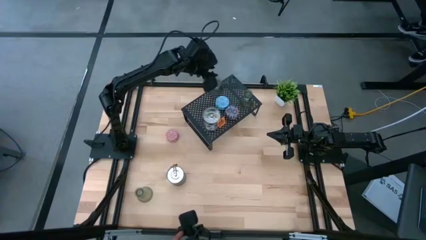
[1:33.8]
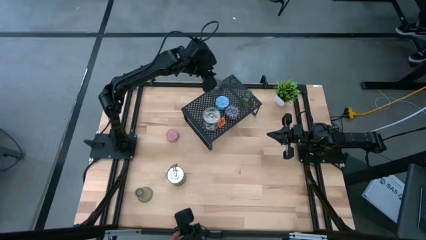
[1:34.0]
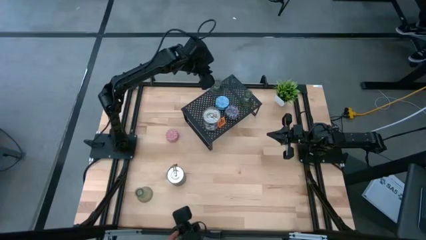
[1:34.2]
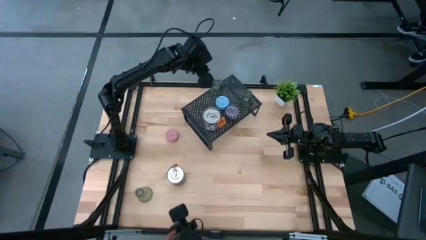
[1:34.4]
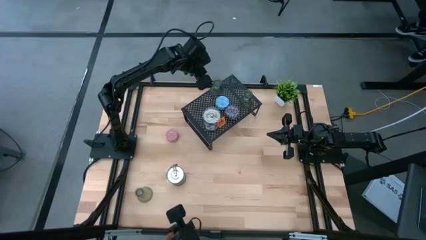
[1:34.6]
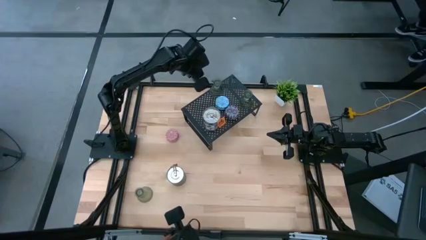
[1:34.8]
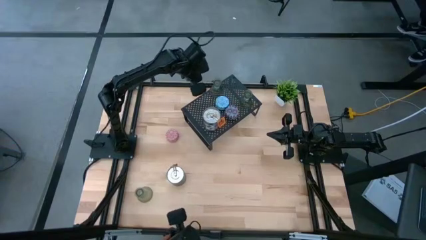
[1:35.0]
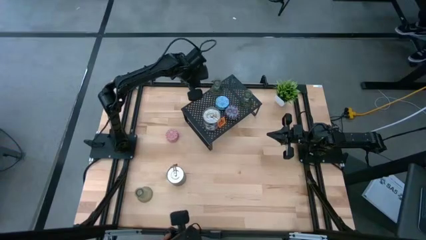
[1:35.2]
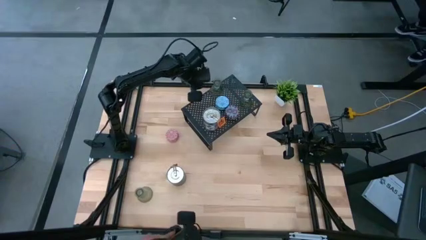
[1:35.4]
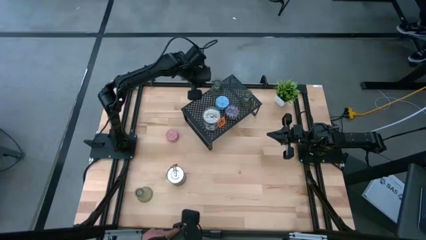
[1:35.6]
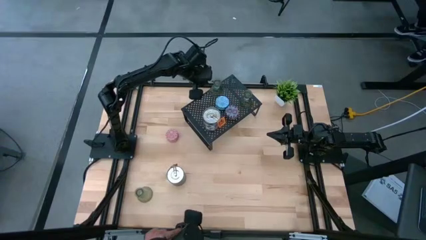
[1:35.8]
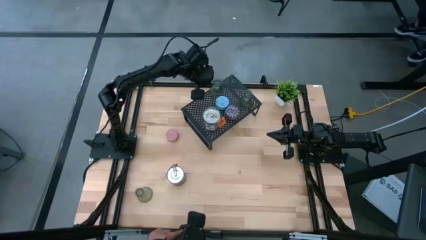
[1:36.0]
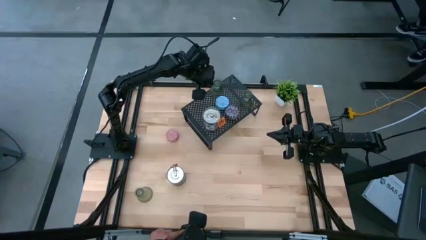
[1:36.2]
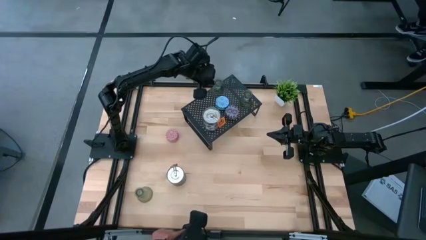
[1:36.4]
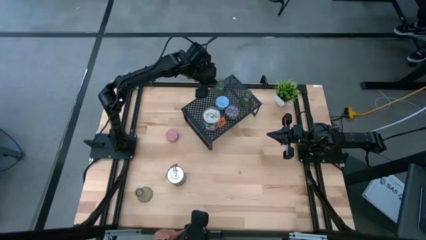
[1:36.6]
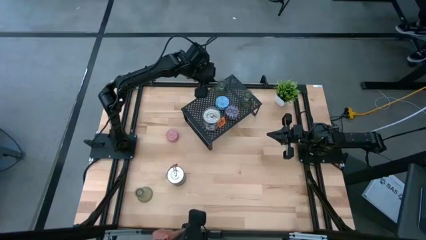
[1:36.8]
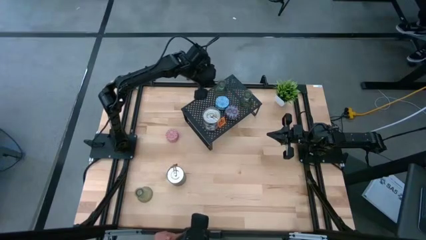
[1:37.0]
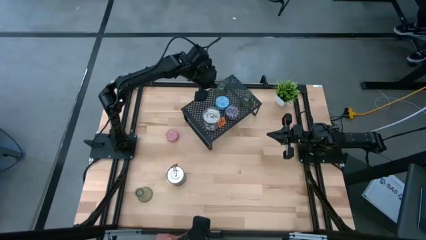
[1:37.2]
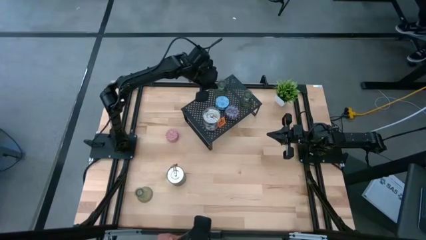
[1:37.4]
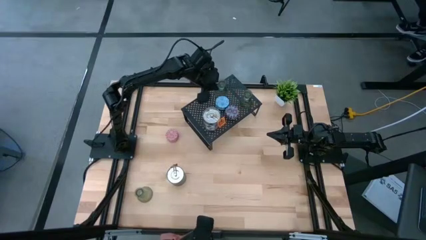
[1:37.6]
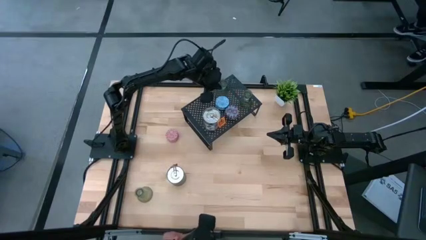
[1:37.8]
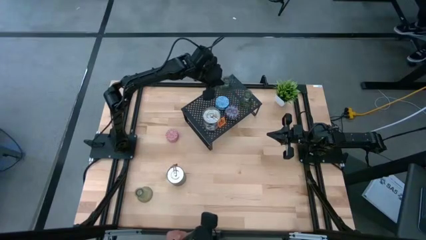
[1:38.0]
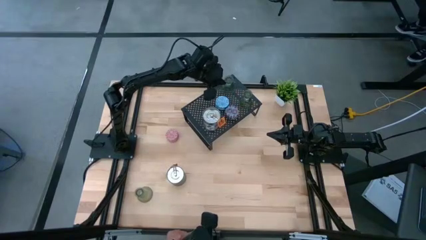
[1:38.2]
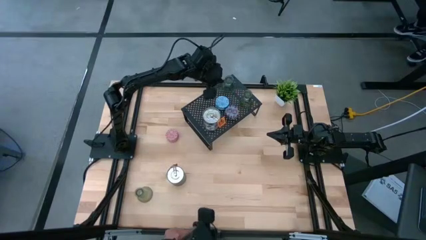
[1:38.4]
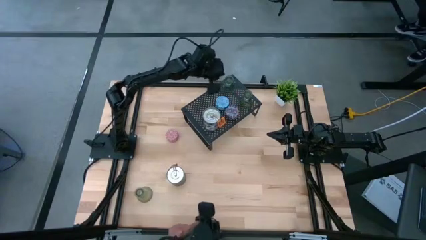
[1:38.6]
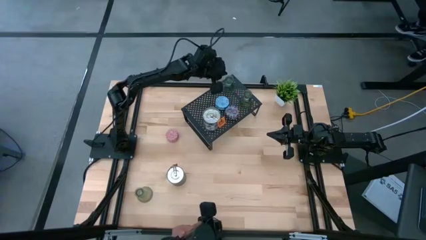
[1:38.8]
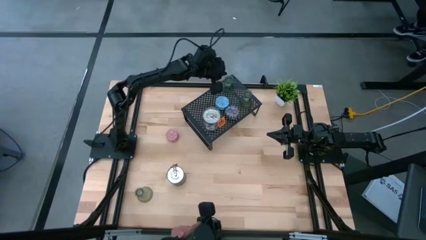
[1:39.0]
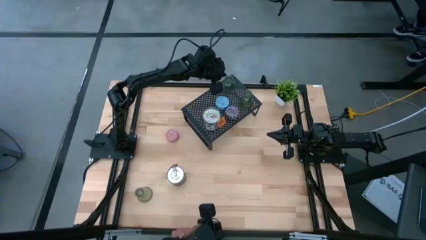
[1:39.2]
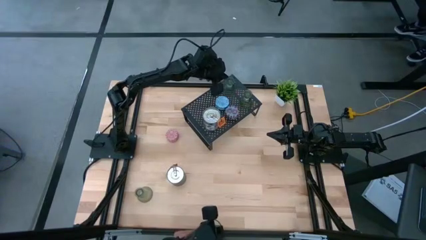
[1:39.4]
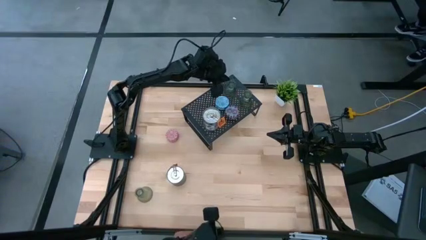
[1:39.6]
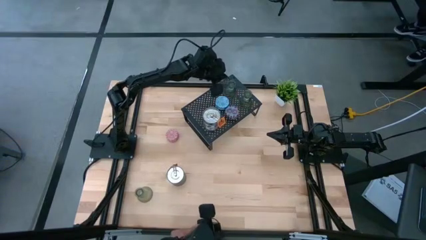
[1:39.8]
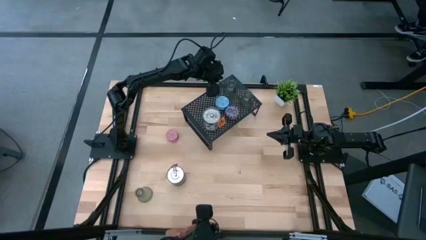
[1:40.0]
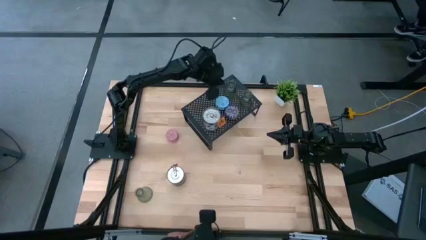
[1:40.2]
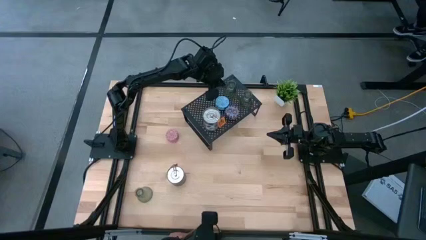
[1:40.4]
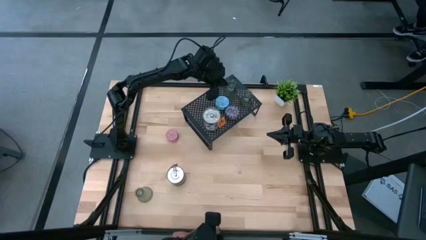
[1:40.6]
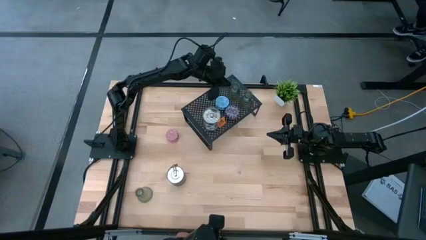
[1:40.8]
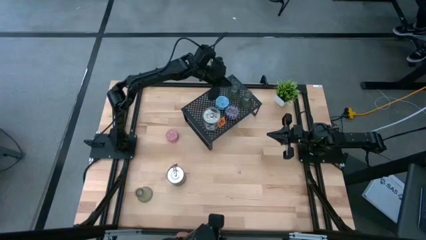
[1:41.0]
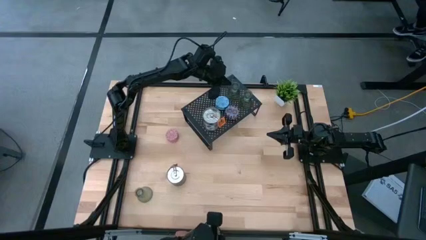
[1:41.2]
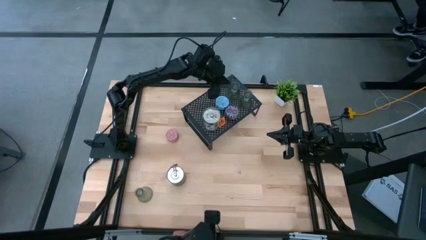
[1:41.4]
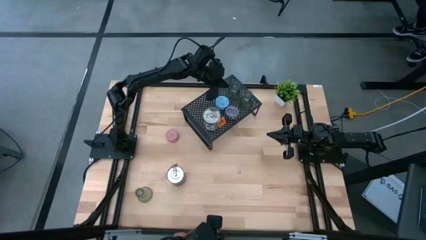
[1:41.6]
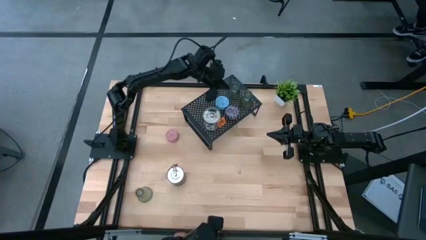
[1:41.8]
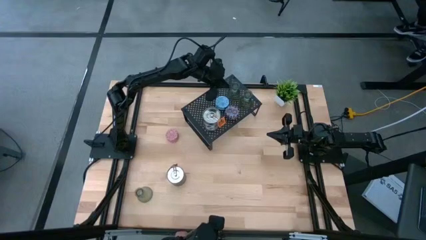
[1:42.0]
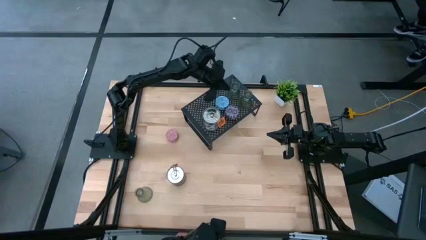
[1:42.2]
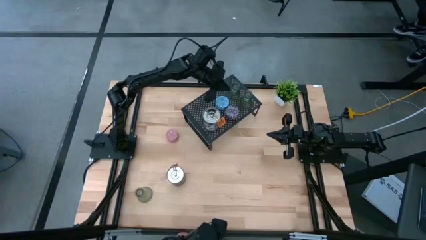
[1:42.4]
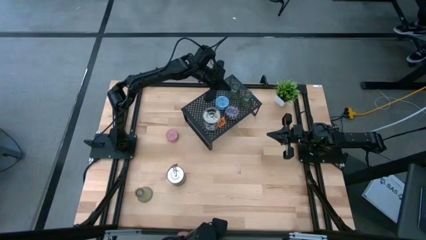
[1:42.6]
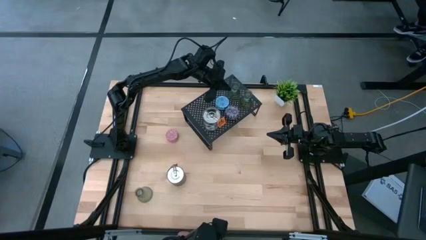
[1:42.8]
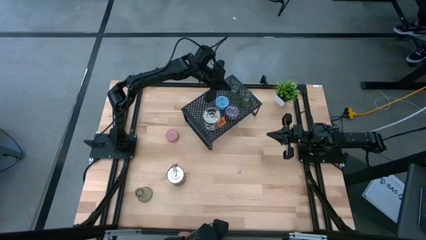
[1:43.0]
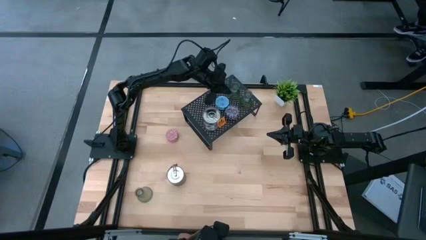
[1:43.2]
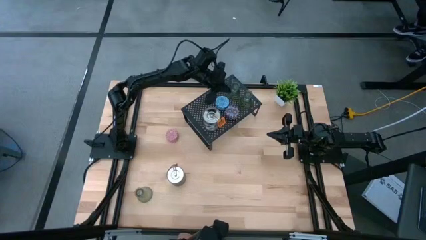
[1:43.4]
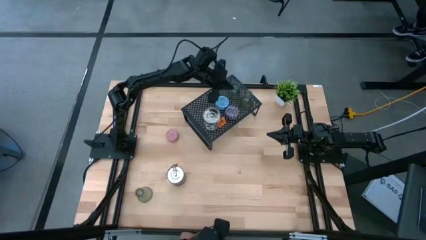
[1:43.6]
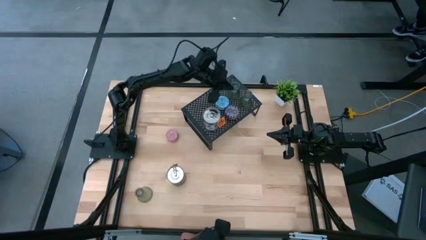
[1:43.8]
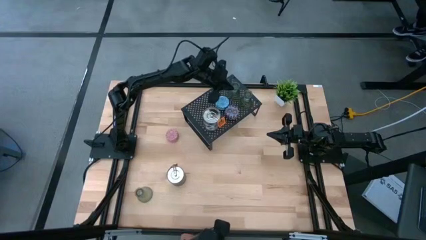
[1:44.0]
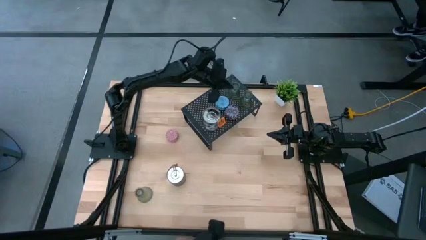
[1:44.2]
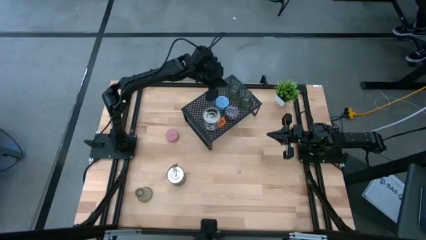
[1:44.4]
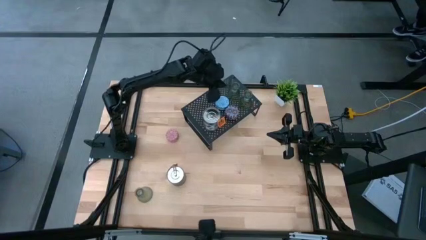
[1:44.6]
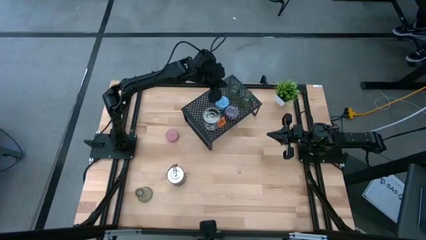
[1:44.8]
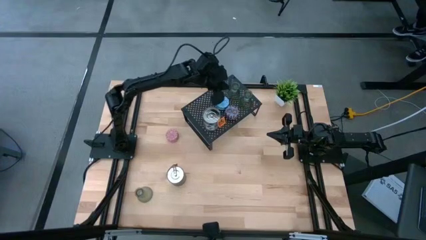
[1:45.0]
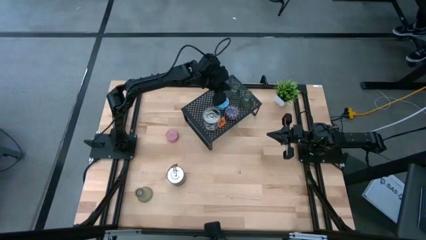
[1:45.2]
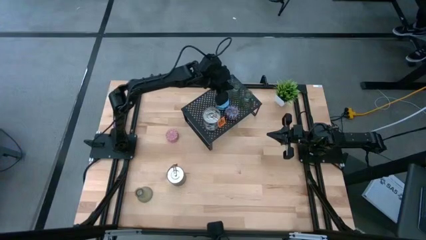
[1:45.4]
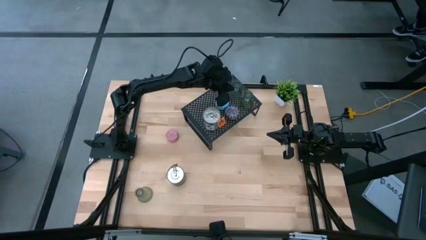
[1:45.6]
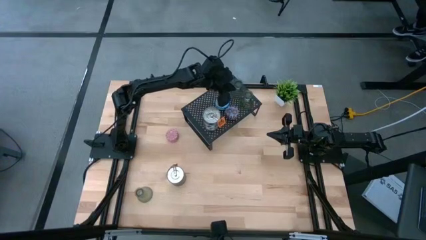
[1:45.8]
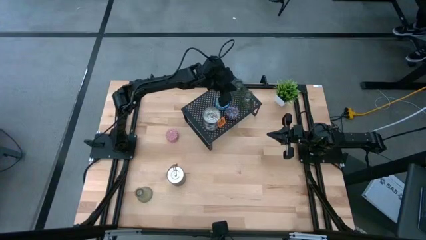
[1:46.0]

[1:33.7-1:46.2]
Task: Pick & Place candle stick holders
Put the top green glass candle holder on the shelf aligned with the green glass candle holder
